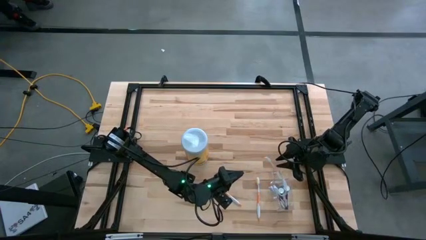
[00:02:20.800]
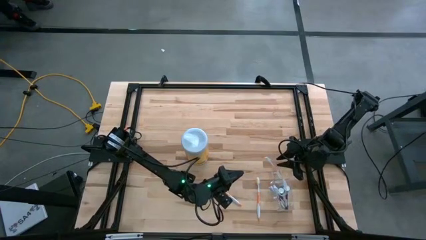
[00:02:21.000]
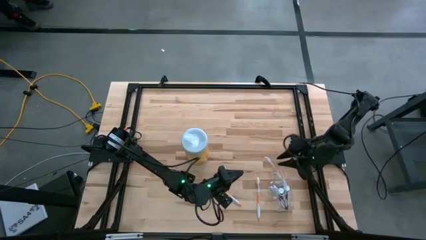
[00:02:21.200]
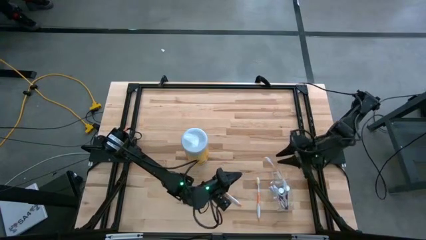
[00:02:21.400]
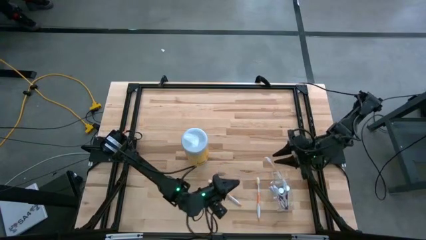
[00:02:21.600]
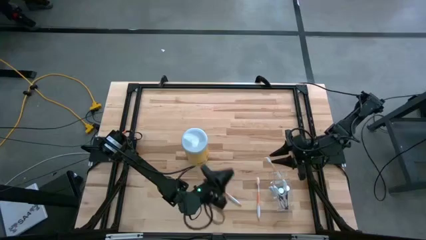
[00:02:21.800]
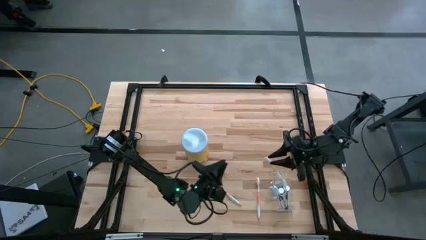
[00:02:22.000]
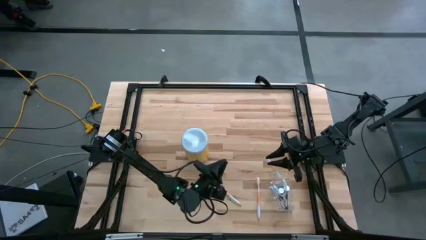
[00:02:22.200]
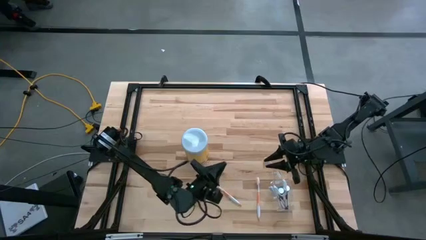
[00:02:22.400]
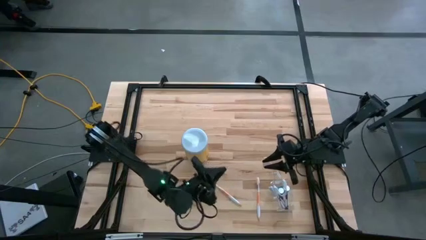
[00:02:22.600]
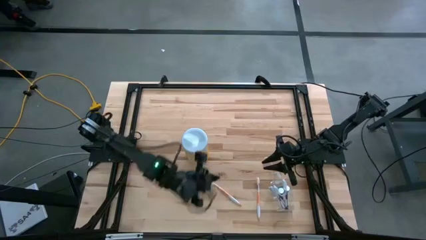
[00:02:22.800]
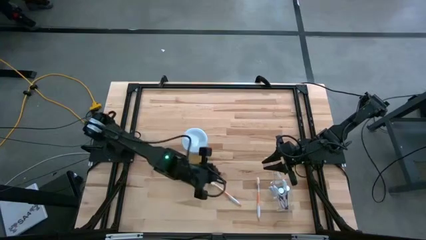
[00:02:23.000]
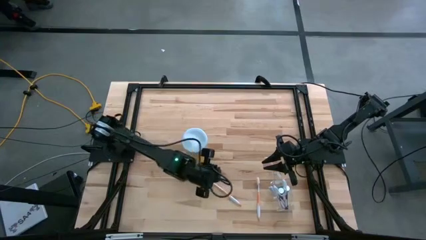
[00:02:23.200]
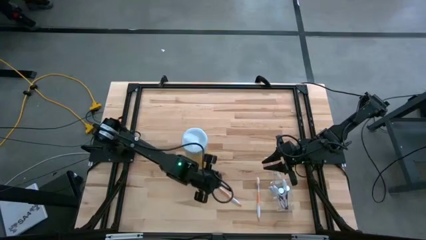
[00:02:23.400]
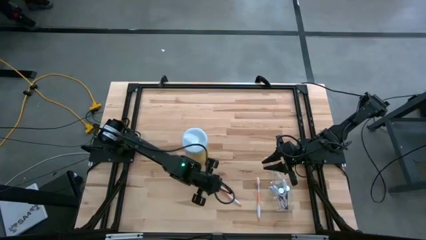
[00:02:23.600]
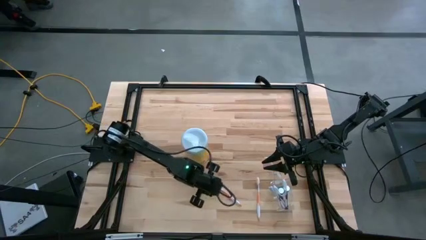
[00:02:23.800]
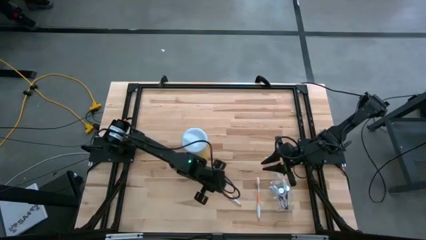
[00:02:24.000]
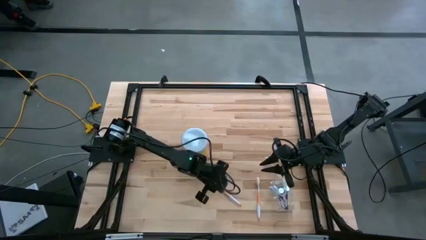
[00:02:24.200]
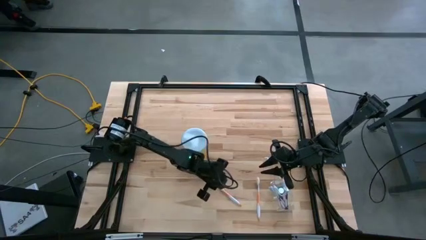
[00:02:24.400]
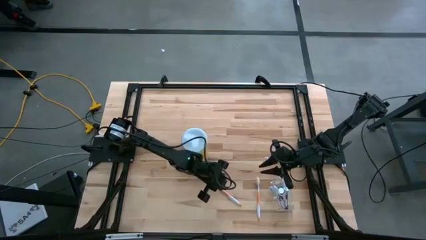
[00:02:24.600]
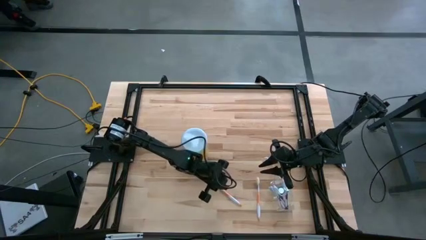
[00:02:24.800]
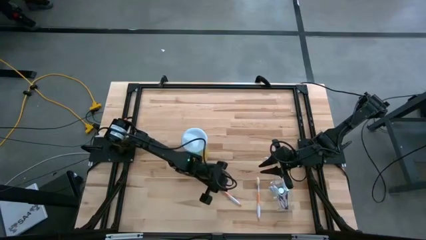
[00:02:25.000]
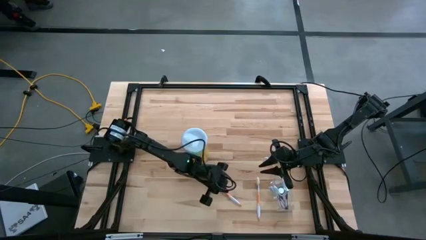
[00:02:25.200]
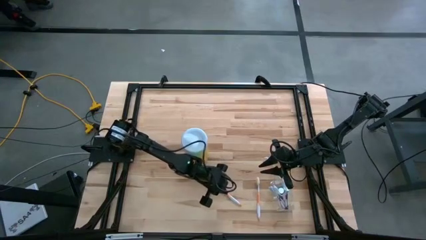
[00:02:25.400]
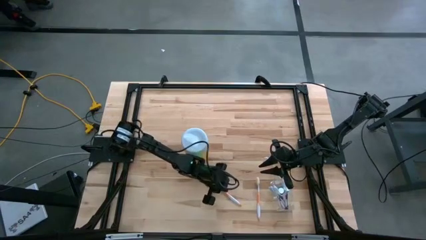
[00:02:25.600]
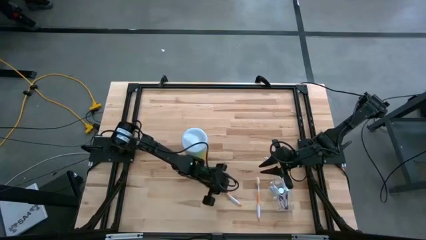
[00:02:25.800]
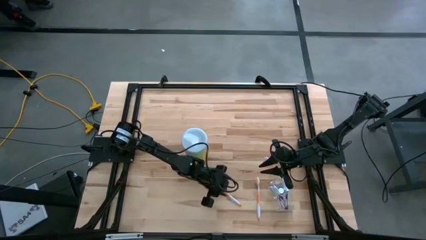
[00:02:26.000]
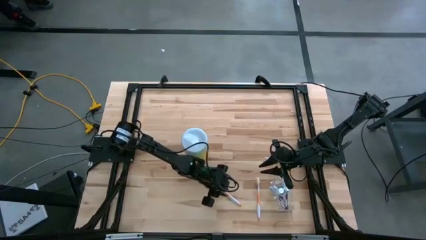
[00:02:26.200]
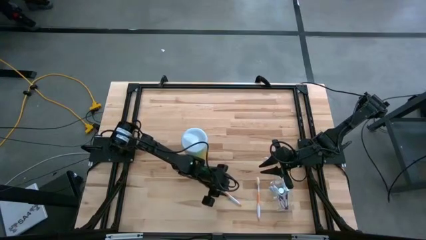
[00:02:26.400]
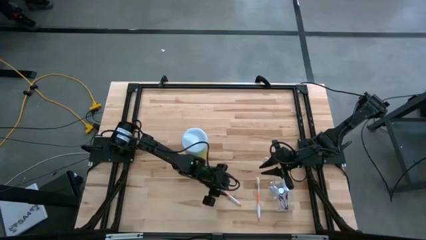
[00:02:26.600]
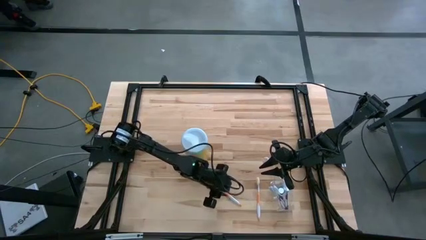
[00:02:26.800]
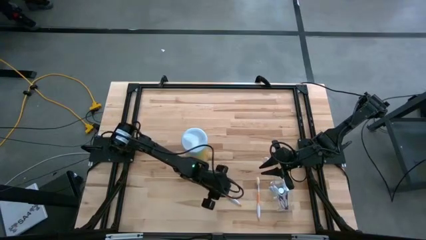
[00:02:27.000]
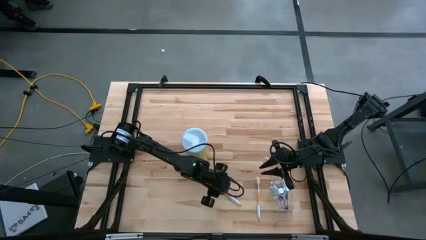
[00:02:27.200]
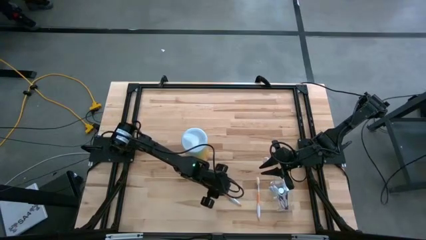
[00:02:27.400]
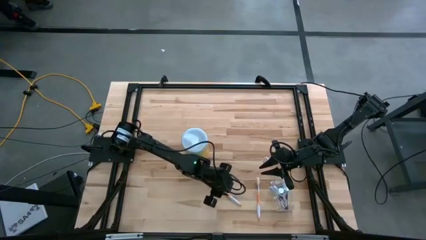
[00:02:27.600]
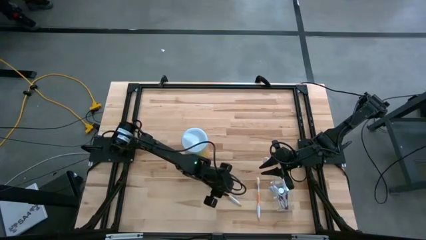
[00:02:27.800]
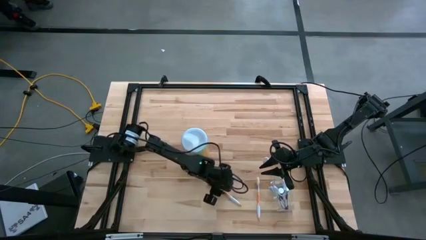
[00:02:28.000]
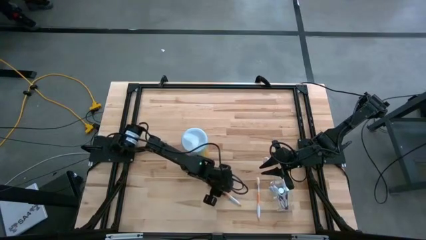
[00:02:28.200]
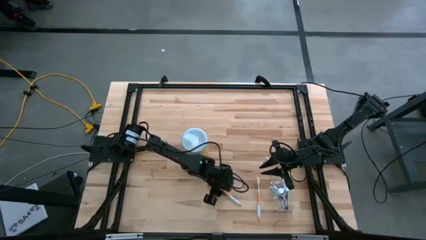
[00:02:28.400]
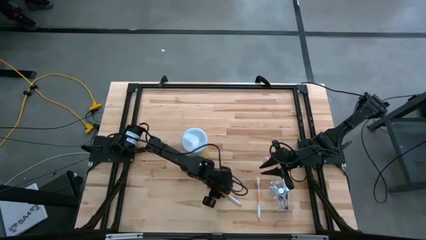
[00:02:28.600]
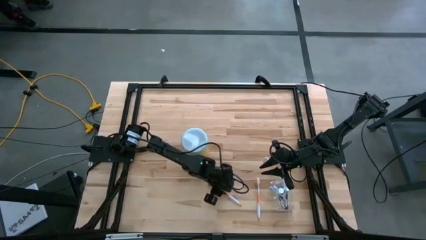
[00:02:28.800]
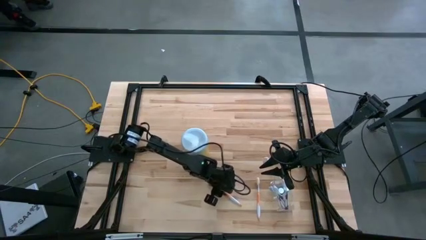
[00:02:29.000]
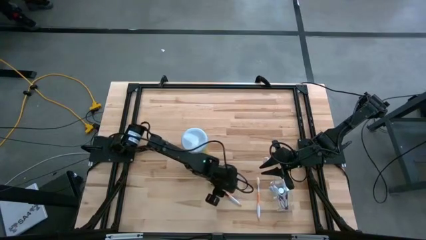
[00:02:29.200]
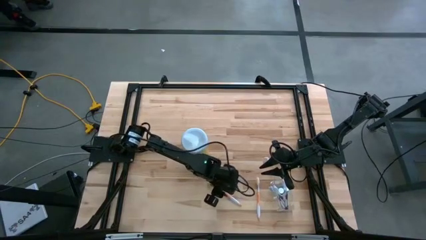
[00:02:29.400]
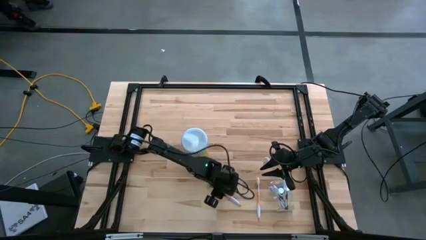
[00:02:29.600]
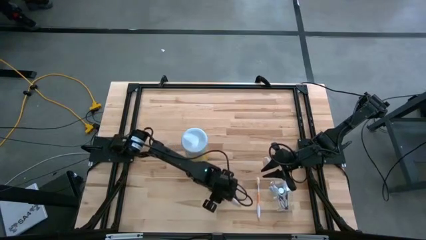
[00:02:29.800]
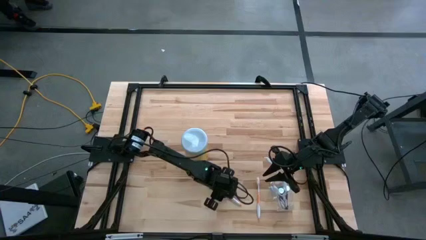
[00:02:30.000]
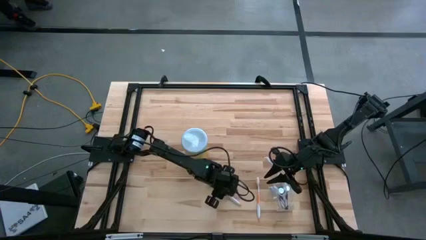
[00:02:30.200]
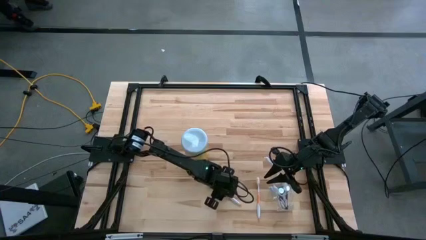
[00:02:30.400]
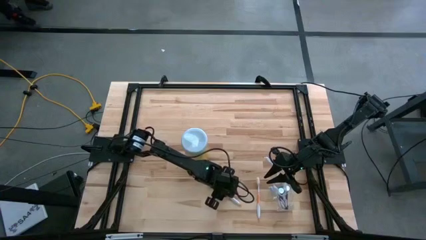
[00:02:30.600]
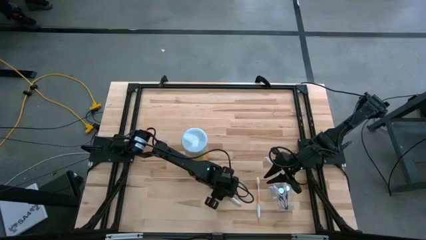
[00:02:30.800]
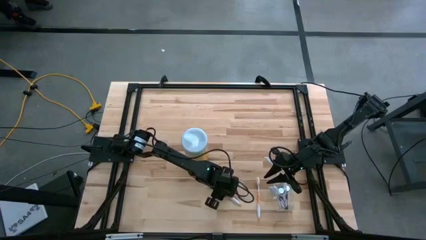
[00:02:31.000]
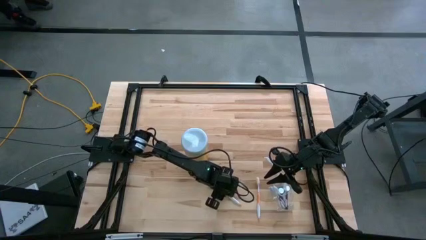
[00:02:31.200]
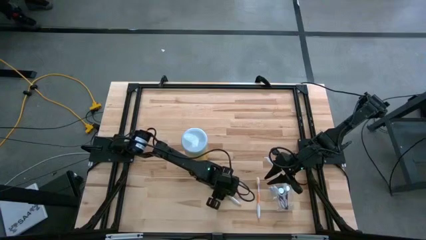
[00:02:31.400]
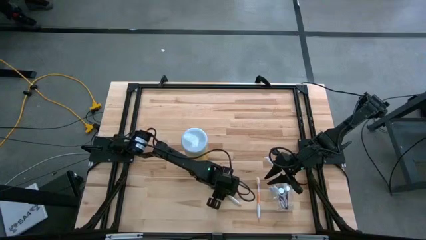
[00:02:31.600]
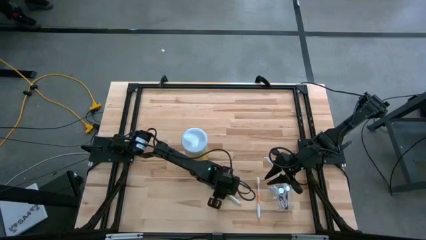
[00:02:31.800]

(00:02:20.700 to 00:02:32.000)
Task: Pick & Place toothbrushing station
Put the left orange toothbrush in the top section of the transparent organizer

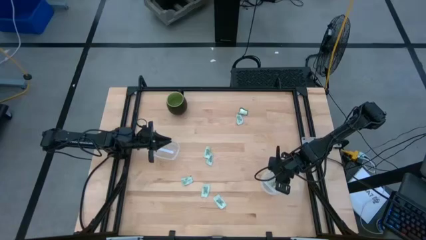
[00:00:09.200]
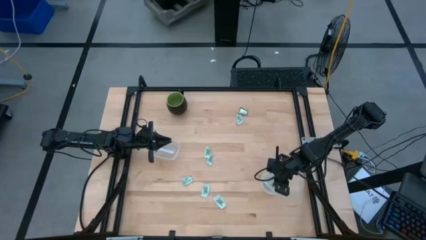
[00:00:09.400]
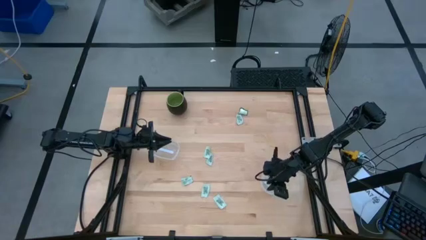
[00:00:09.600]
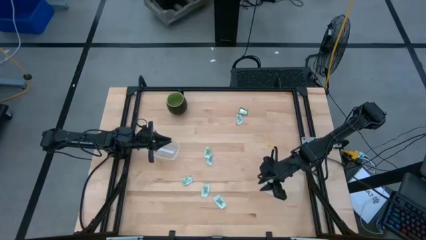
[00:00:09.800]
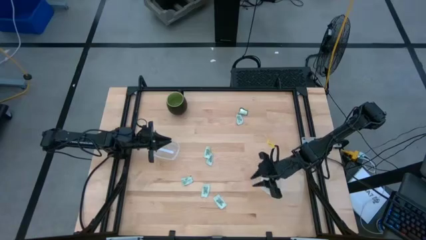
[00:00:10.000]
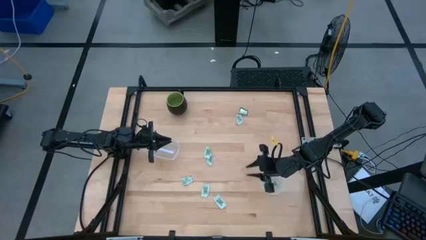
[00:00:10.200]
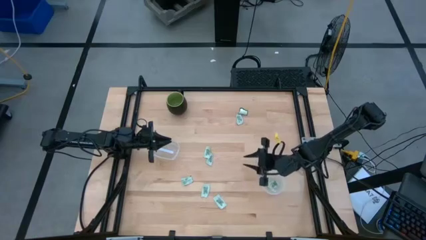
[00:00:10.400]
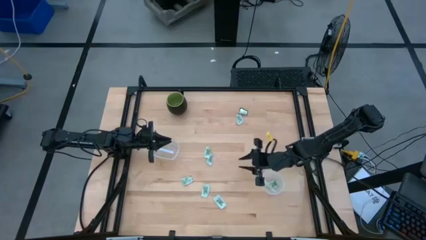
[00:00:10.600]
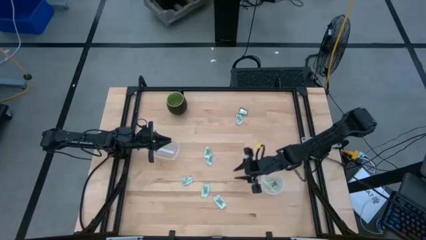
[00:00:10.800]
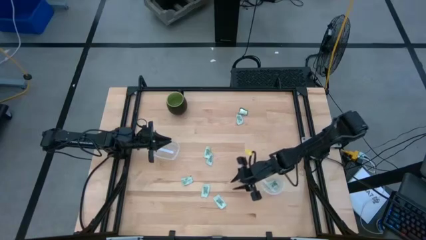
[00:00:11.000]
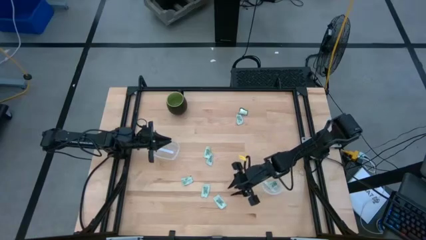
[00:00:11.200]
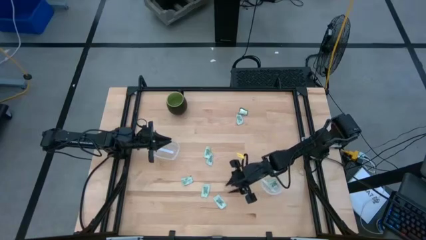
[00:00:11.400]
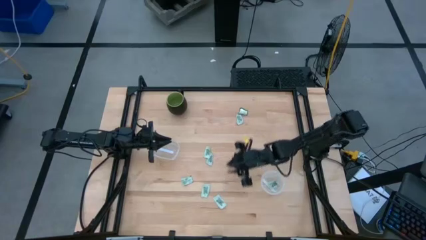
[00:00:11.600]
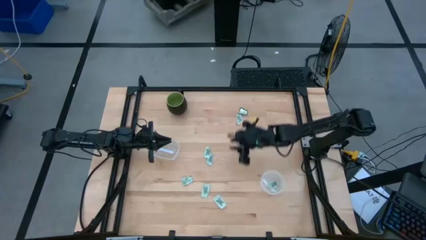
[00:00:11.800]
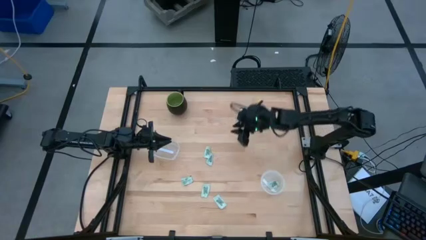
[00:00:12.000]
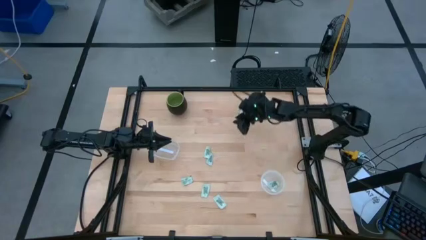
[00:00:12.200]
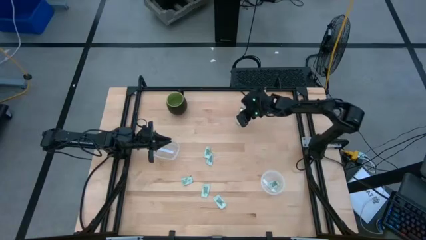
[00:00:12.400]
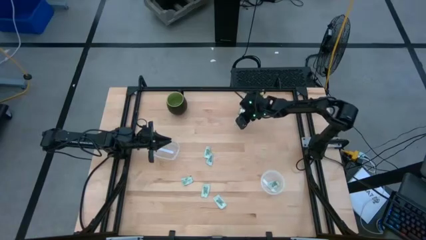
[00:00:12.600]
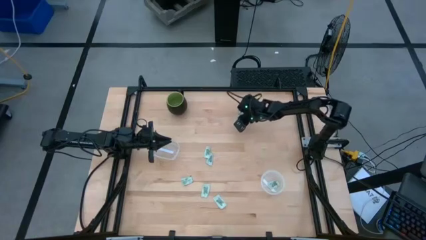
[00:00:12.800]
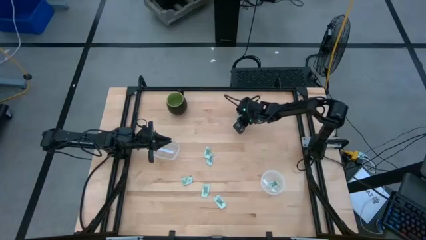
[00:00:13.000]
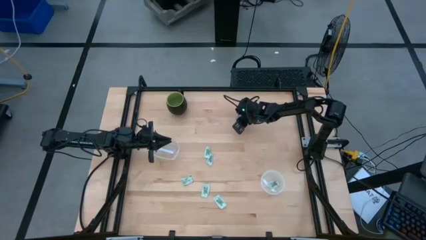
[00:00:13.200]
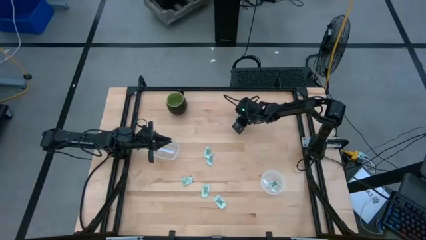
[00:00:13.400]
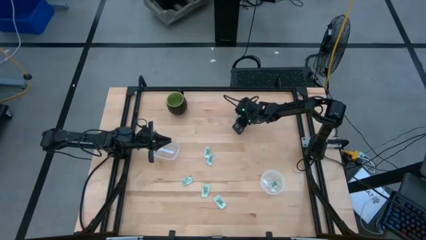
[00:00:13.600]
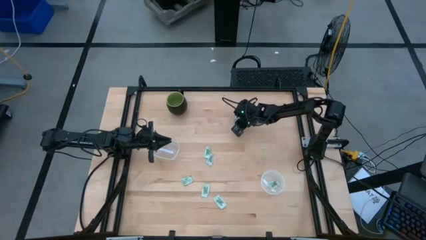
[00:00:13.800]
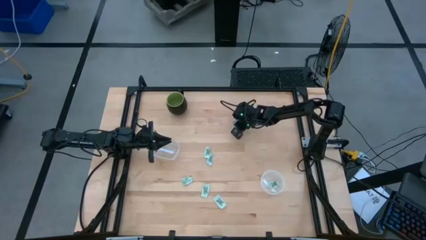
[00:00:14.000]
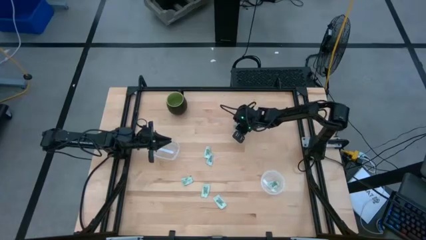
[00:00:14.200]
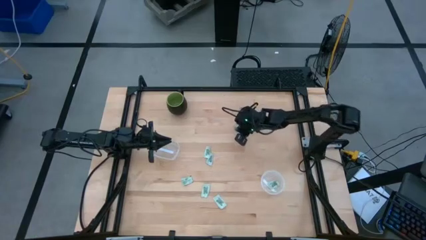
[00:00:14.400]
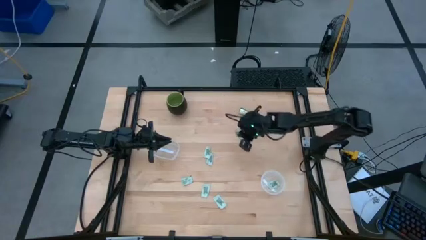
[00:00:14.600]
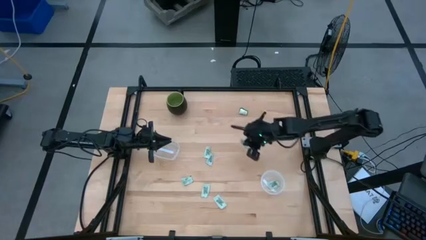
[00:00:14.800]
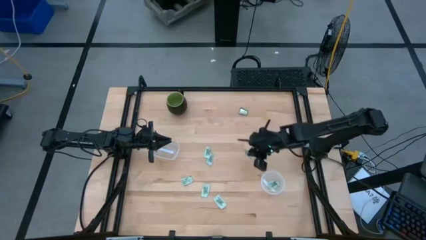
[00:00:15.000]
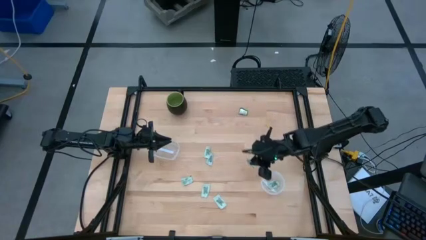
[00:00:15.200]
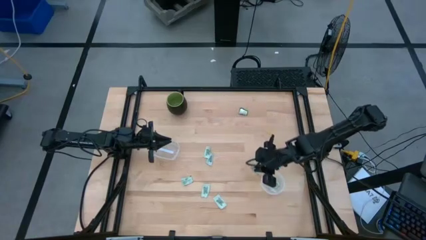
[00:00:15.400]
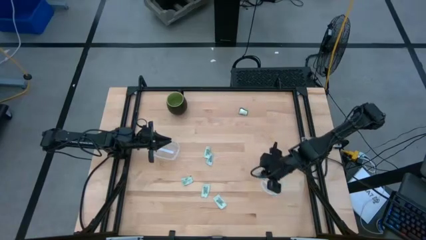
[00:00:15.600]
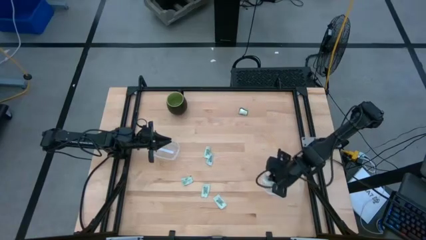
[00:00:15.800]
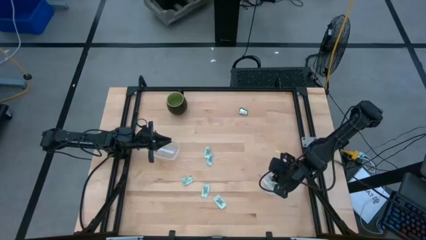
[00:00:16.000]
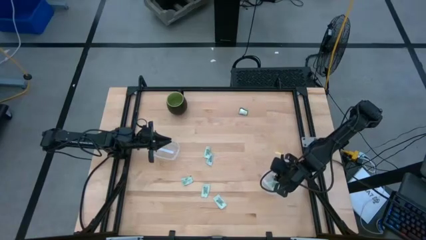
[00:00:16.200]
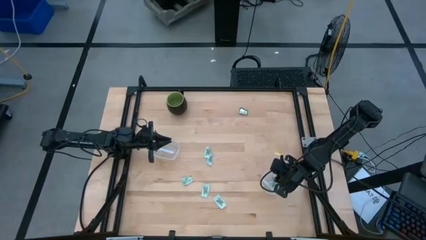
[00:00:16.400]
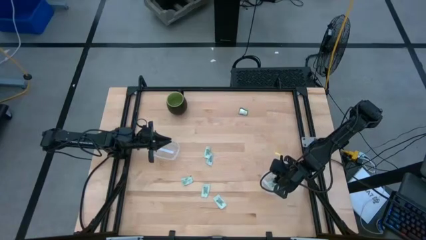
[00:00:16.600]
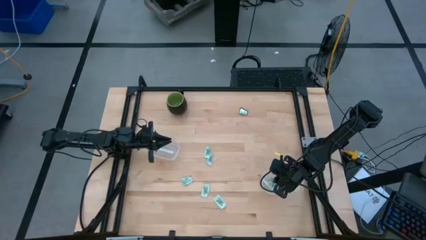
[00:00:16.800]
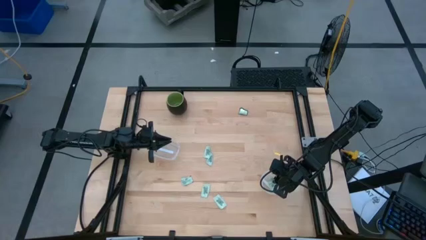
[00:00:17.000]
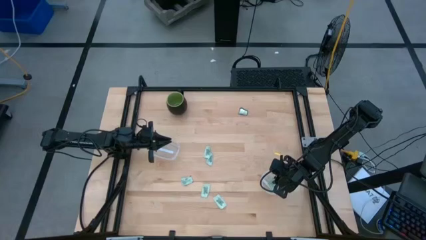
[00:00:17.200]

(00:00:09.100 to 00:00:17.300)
Task: Pick and place Stevia / Truvia into bins
Put the white stevia packet into the right transparent container
